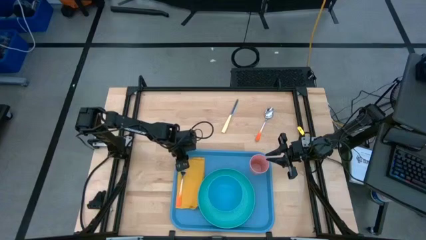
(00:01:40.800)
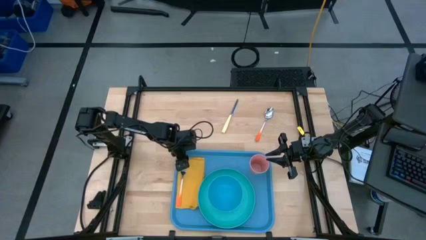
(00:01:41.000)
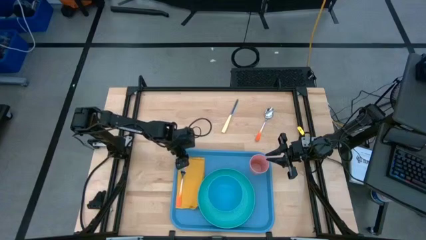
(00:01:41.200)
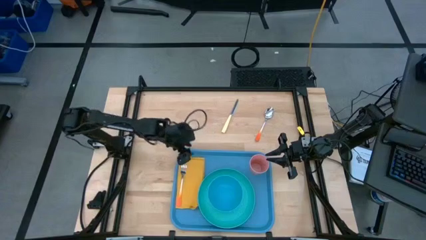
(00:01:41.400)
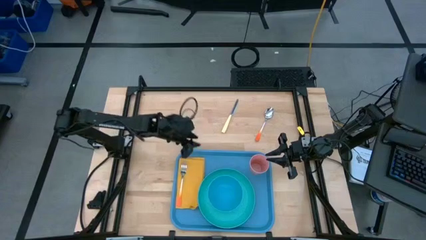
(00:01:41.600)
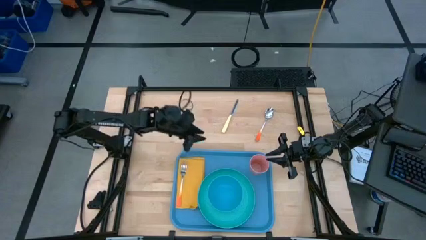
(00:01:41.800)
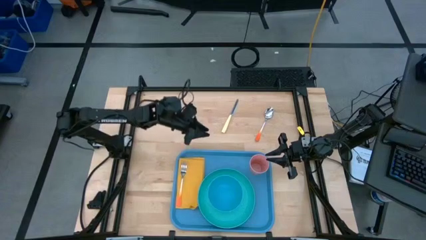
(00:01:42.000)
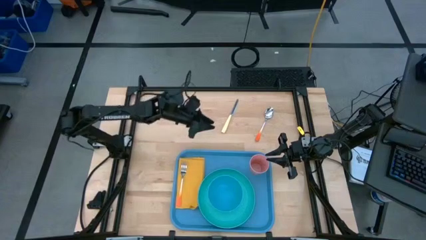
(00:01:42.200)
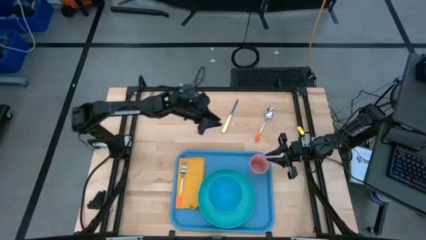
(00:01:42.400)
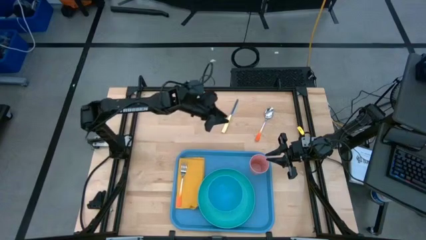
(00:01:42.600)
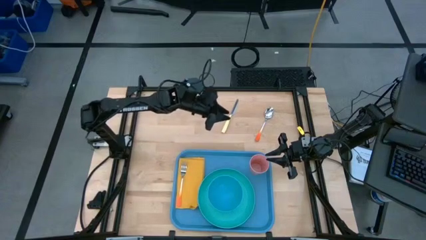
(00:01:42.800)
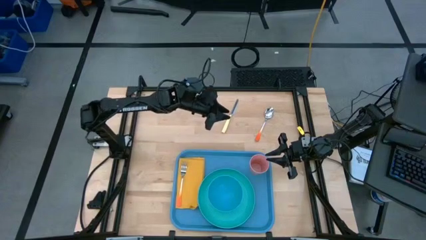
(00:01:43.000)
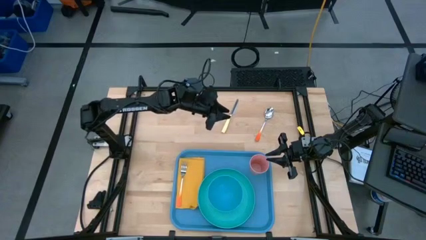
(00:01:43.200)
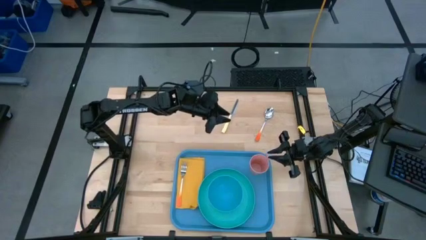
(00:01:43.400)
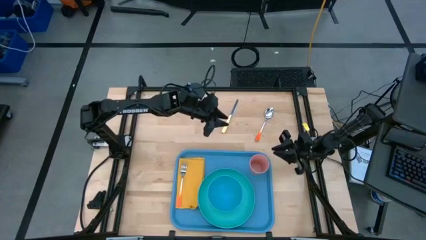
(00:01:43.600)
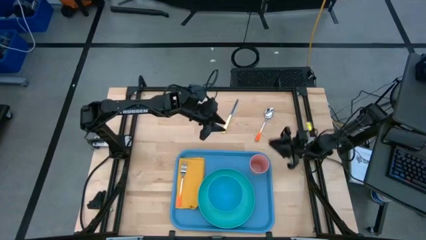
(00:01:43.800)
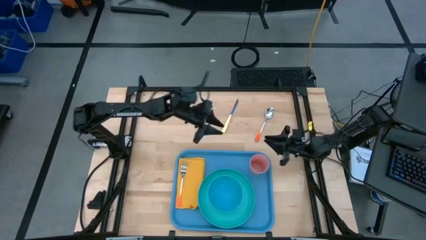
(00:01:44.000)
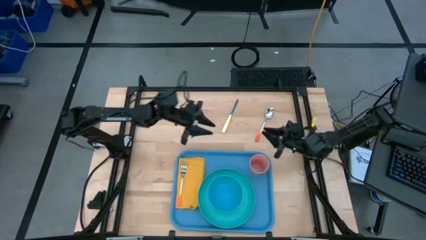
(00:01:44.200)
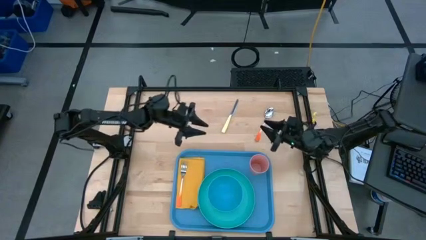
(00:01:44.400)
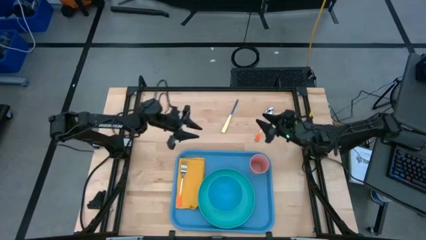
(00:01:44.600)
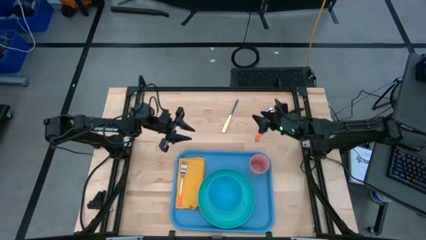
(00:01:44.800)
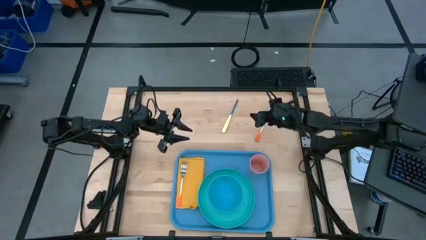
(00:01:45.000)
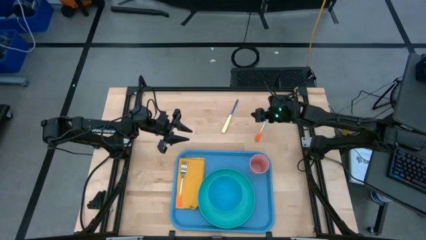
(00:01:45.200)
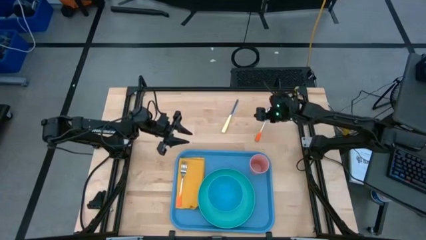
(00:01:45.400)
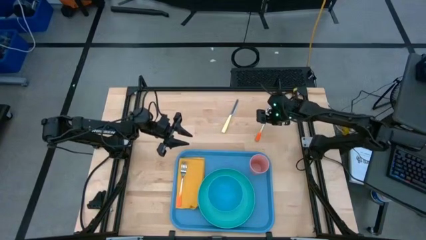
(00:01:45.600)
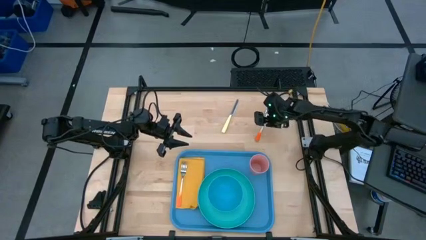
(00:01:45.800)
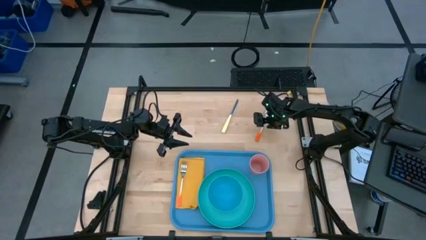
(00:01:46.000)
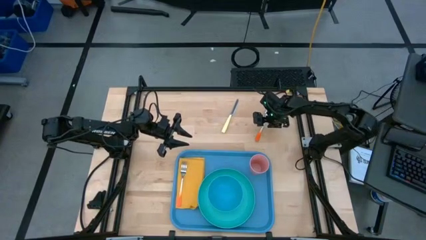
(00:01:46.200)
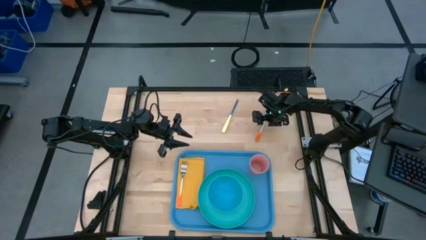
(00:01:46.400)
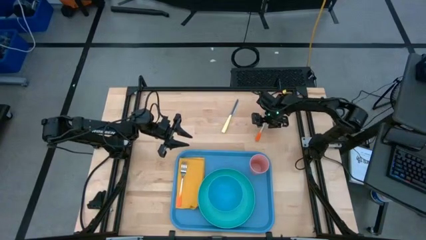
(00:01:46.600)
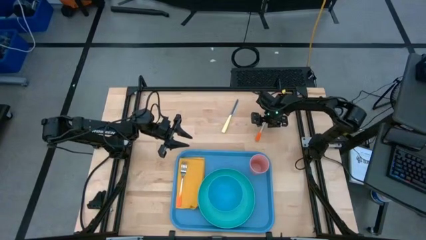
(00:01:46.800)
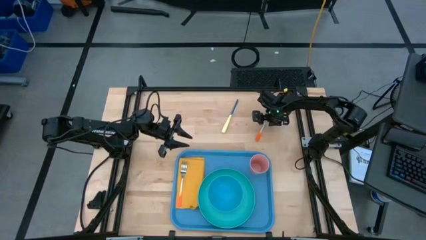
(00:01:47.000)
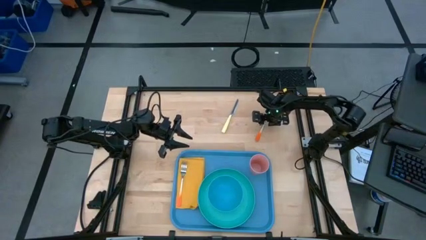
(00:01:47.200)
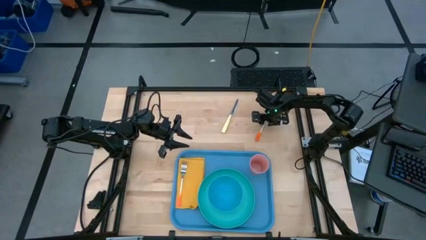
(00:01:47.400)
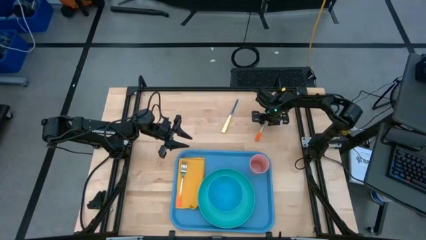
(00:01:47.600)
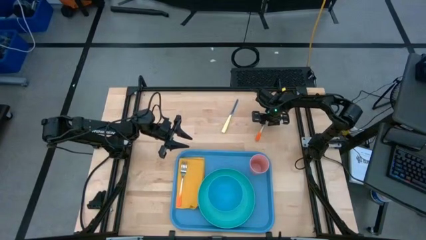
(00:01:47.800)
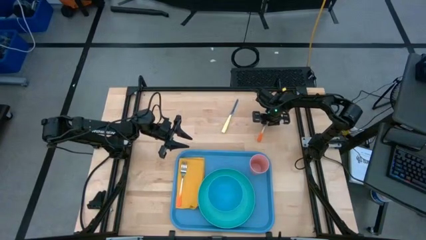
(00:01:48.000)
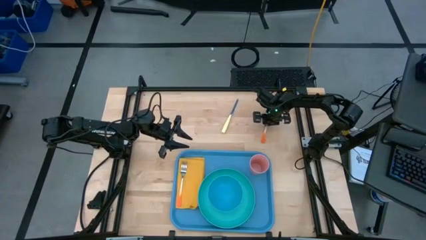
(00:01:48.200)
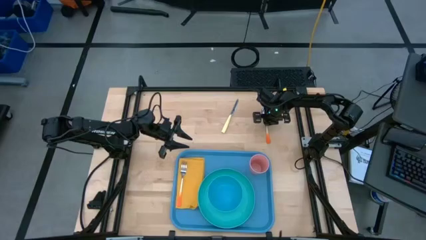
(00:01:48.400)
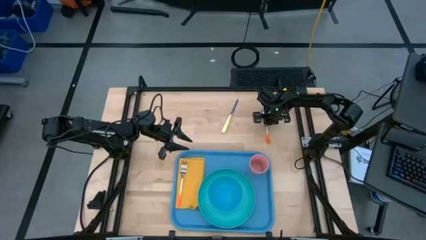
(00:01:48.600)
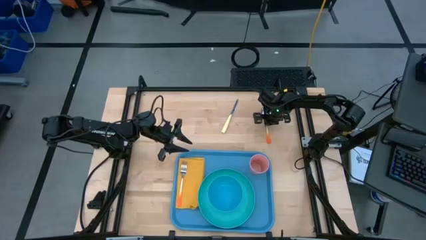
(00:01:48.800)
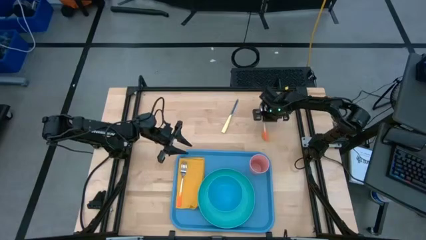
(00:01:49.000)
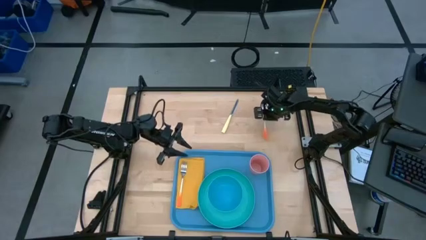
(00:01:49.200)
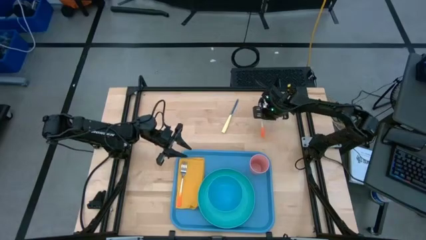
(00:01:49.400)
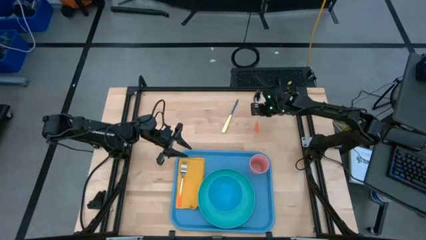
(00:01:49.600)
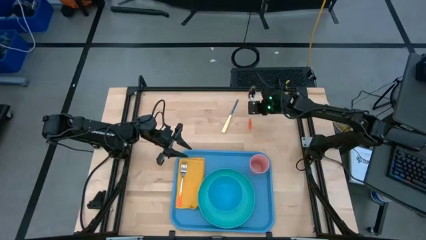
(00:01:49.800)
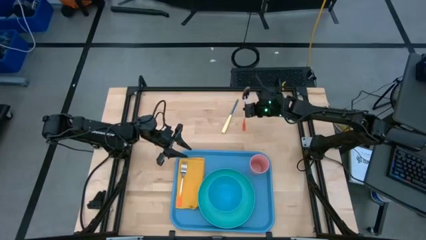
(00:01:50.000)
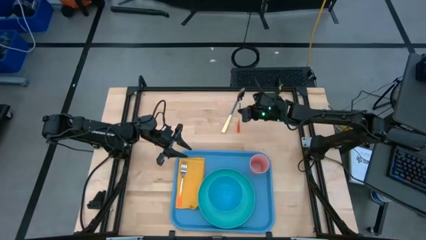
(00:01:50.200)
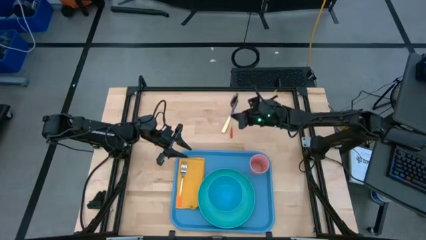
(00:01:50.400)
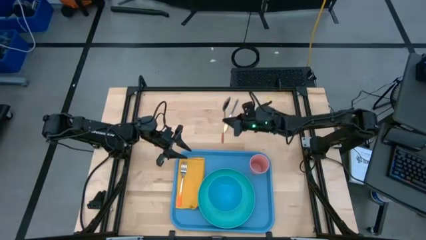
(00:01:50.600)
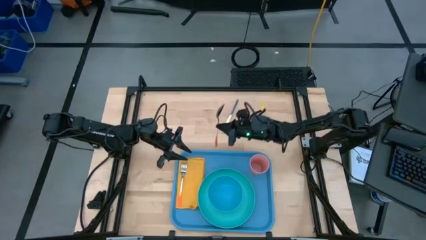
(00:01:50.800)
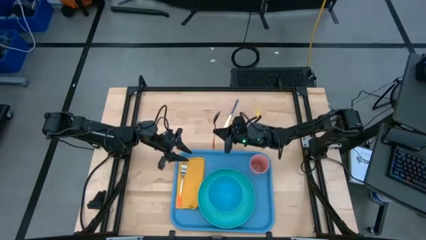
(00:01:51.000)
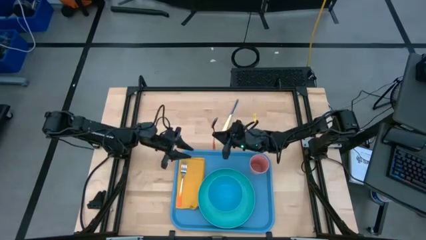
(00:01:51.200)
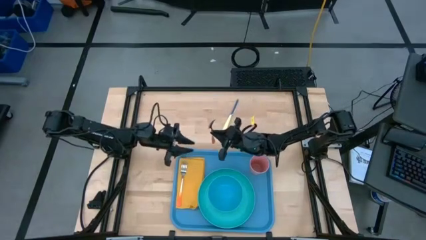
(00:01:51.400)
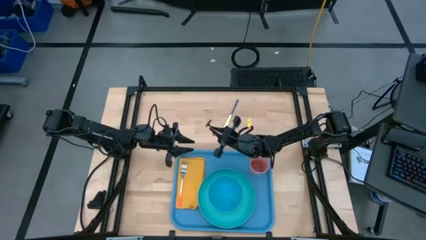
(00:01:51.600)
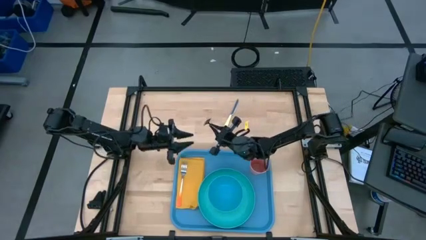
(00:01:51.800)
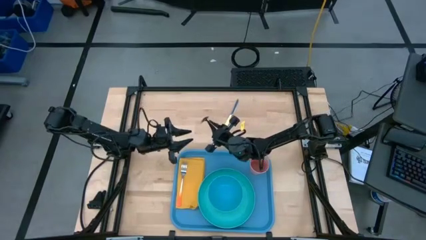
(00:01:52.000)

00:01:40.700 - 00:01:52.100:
Task: Set up tray
Put the orange spoon to the right of the orange fork on the orange napkin on the blue serving tray

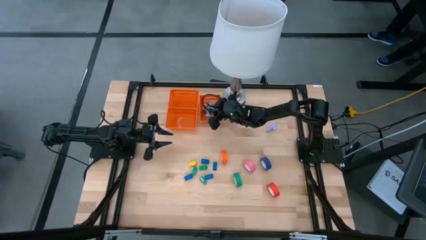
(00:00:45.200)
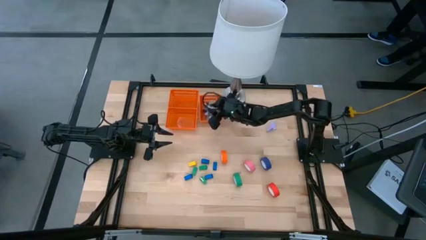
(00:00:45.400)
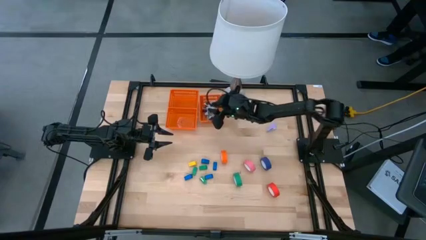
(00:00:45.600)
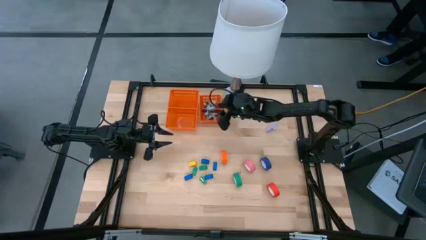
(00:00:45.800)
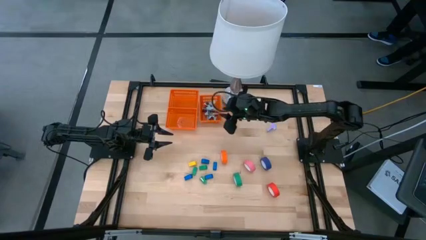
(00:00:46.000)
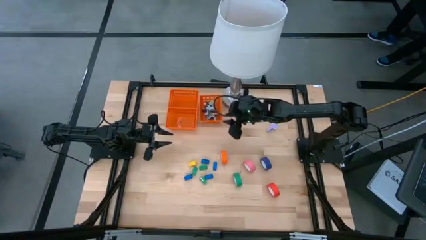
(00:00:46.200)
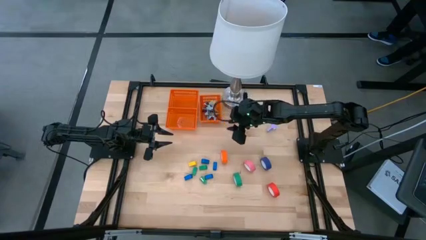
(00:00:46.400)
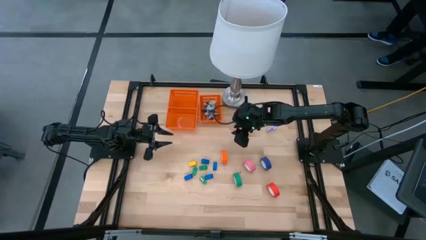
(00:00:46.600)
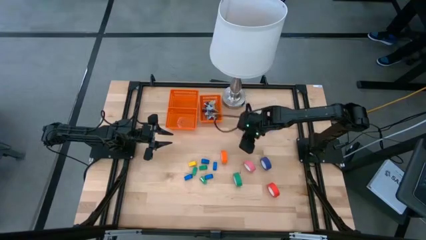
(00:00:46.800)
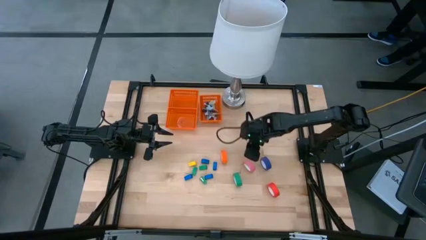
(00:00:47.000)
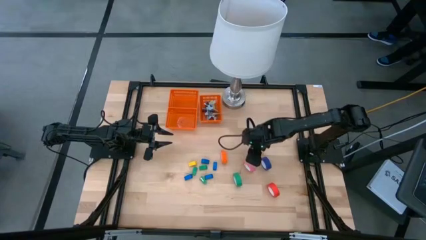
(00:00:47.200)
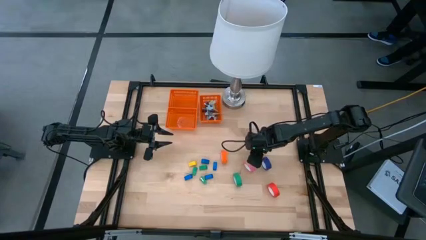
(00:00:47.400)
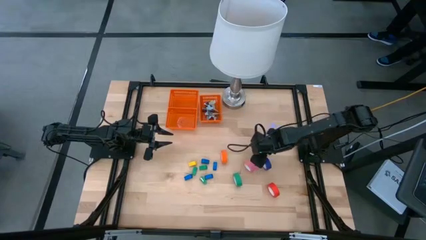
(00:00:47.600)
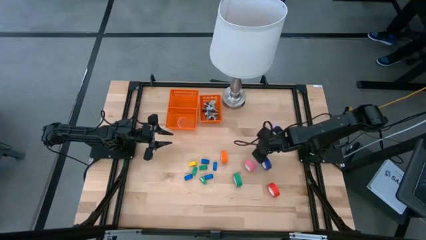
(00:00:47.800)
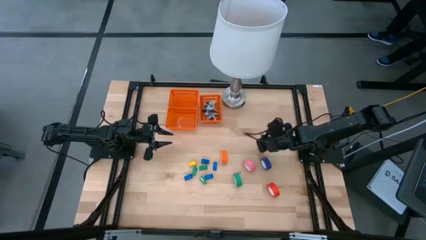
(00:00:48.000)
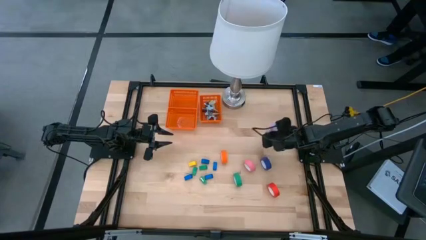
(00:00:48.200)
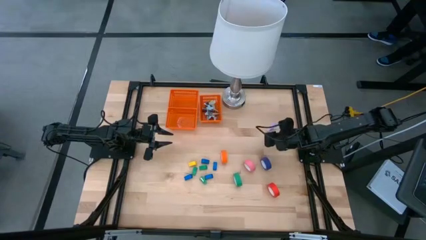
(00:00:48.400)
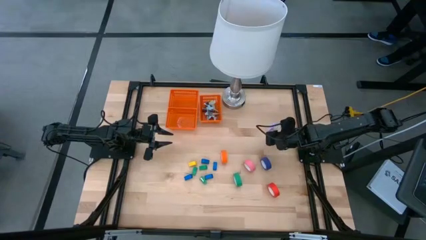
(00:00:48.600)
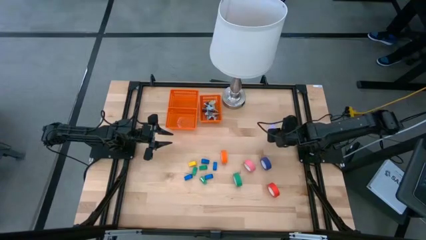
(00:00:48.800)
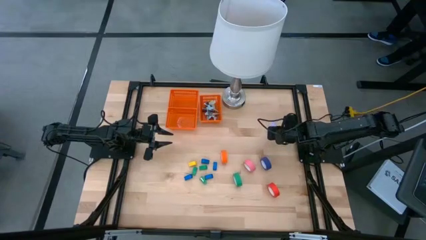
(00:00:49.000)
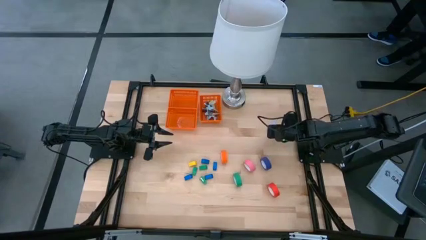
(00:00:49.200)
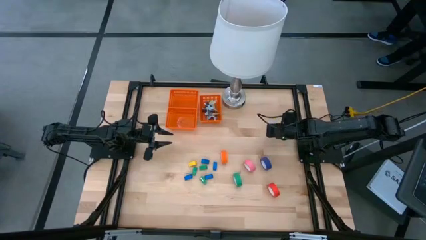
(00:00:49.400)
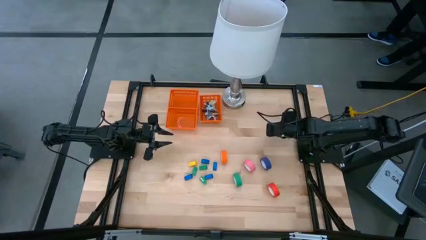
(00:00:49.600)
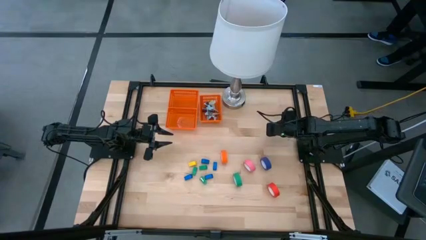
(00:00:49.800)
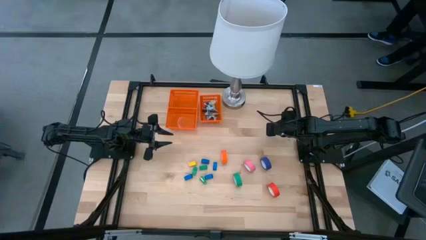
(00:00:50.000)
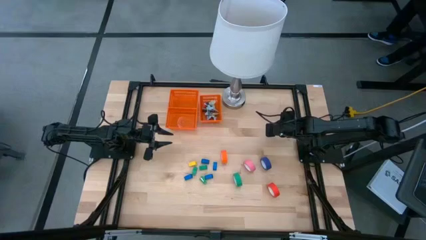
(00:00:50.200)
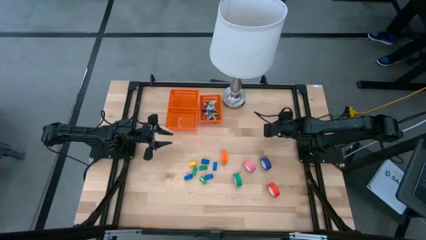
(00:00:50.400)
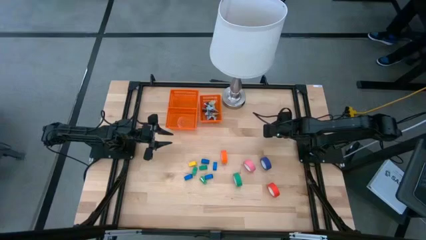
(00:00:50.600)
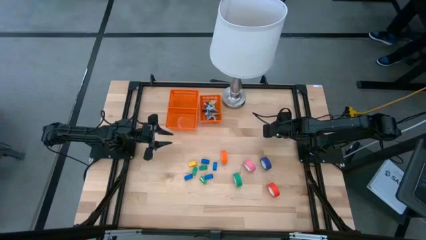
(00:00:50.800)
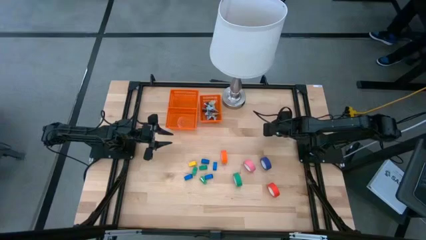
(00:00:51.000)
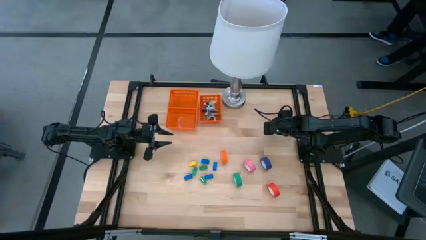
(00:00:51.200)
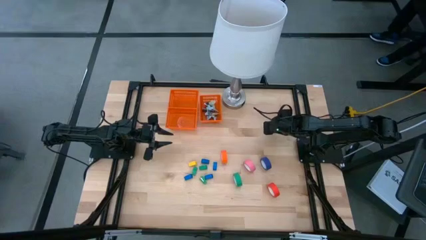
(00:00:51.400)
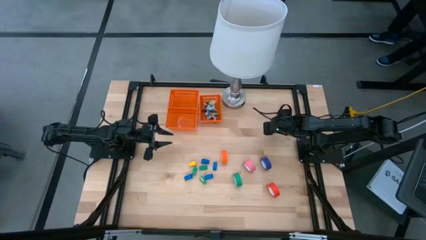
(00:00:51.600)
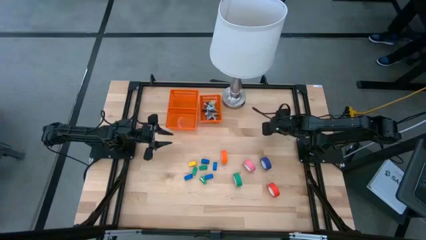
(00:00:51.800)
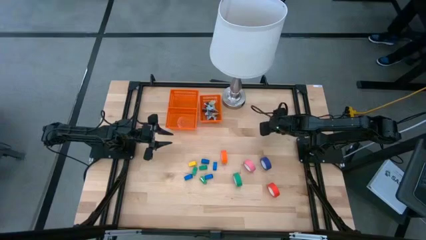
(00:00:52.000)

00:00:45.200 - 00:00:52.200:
Task: Pick and place Stapler, Stapler remover, tape
Put the purple staple remover into the right orange basket
